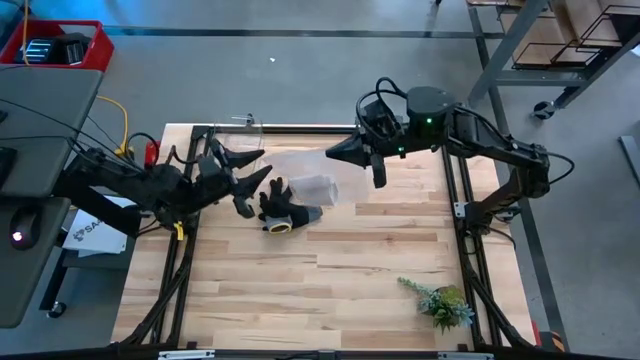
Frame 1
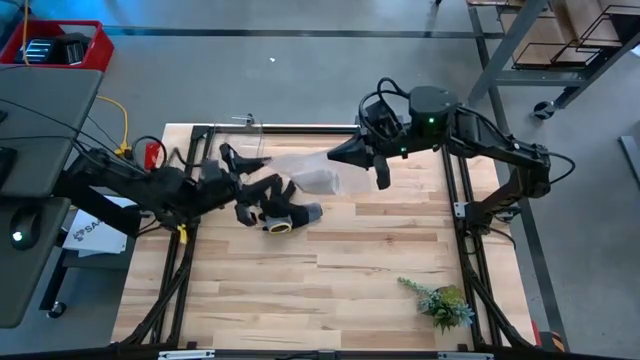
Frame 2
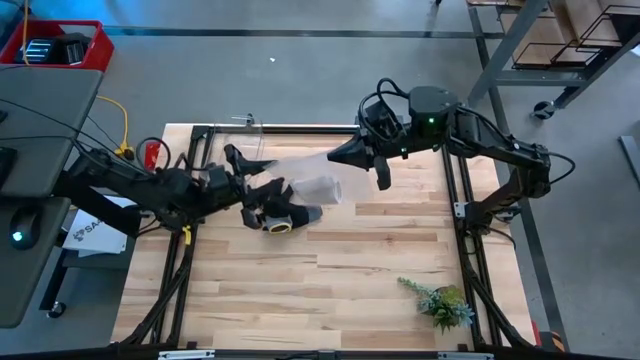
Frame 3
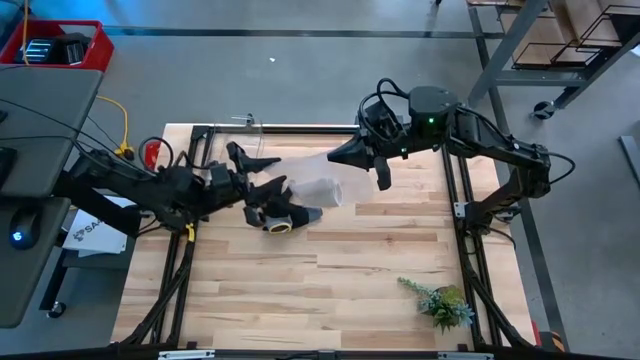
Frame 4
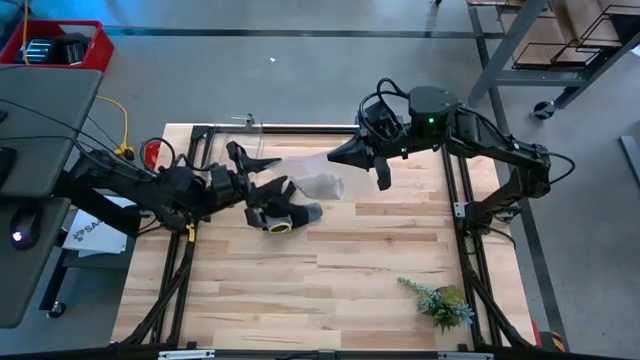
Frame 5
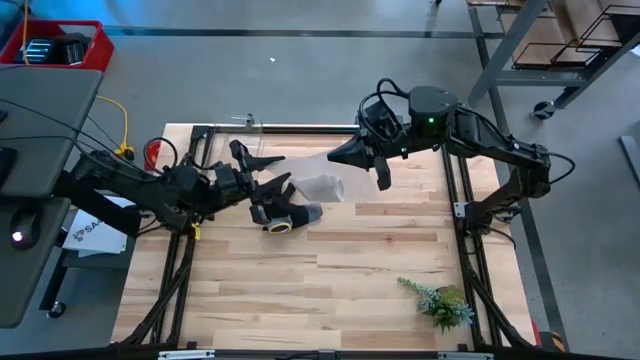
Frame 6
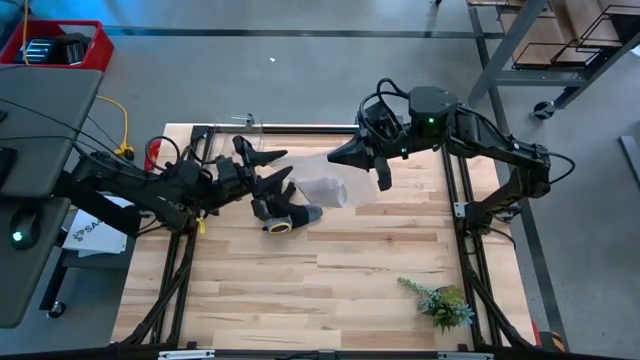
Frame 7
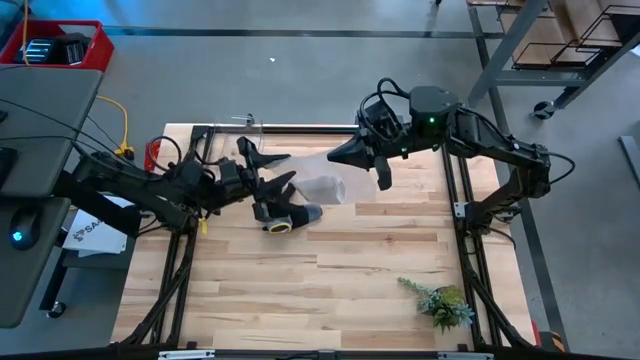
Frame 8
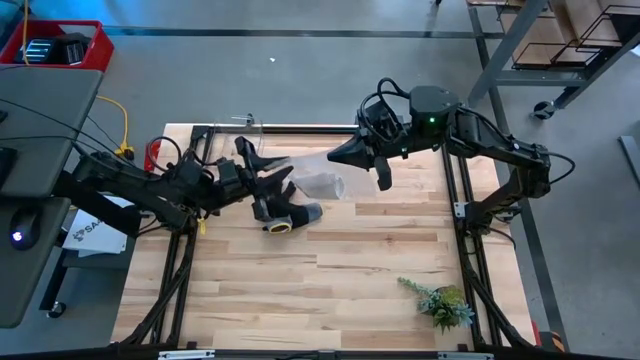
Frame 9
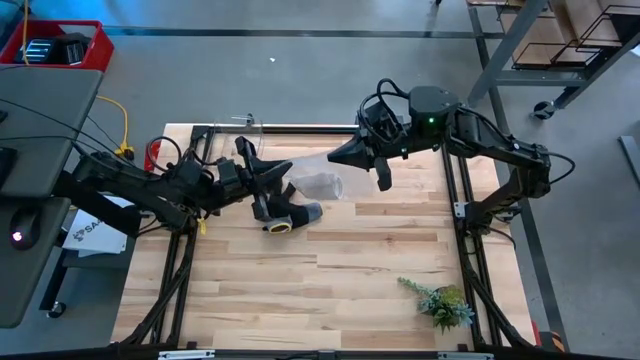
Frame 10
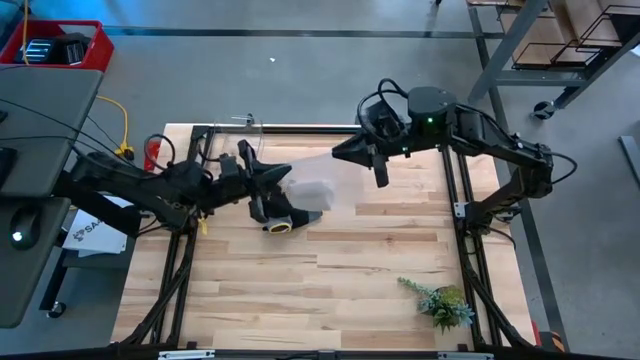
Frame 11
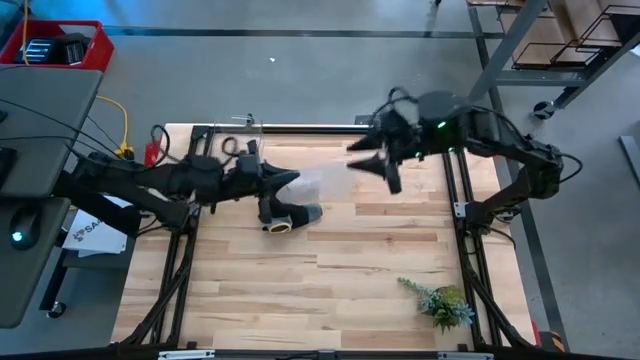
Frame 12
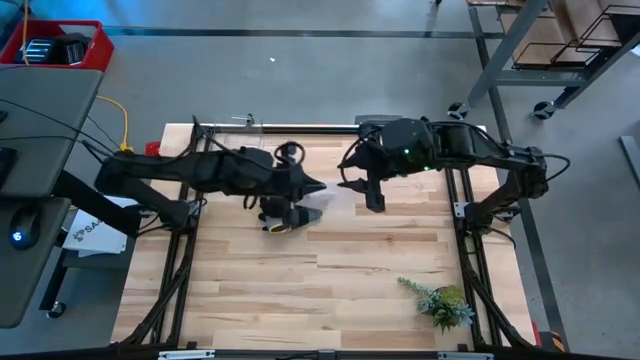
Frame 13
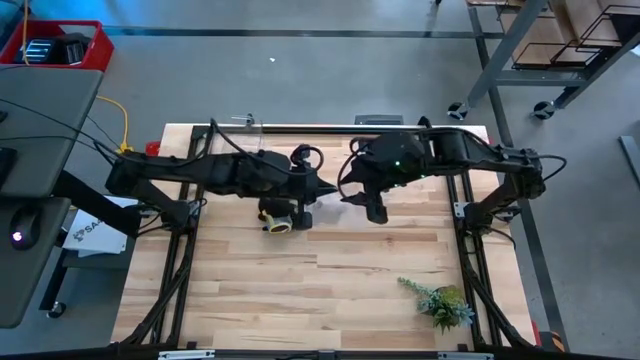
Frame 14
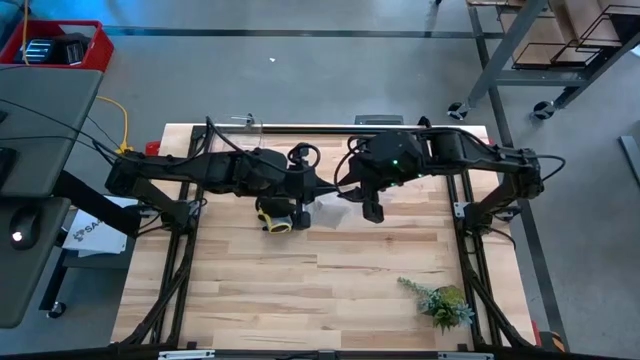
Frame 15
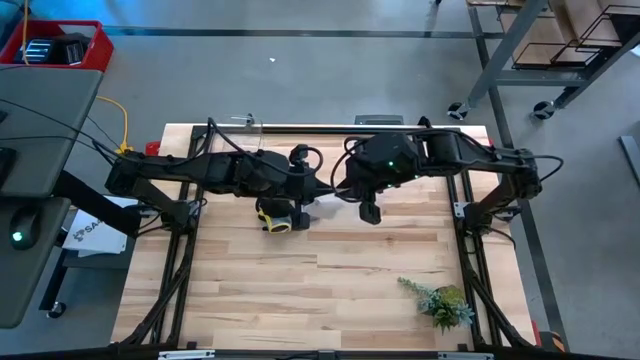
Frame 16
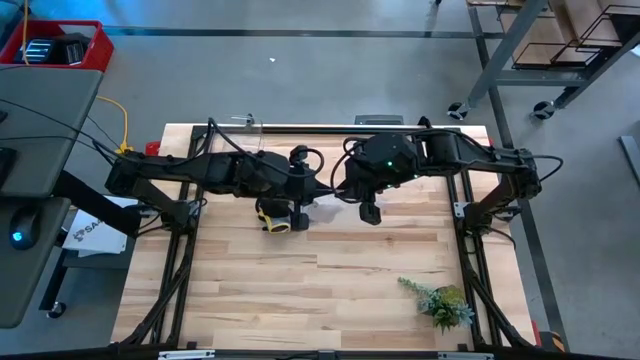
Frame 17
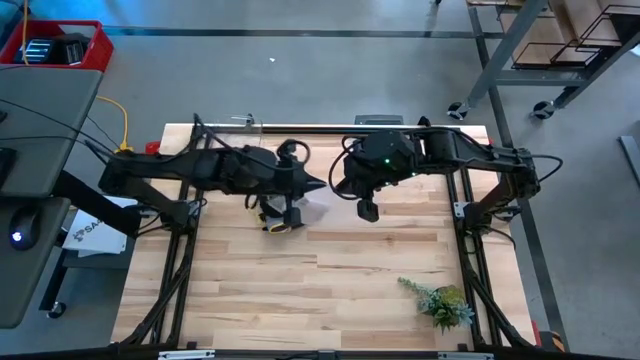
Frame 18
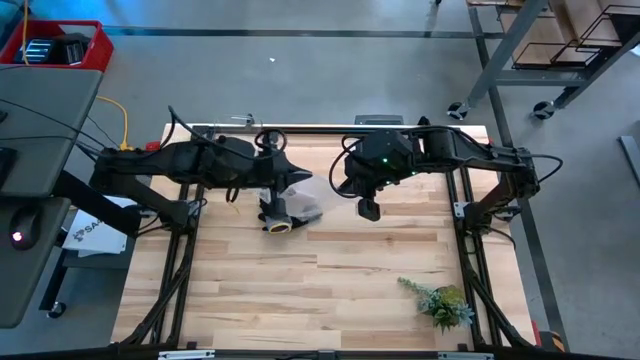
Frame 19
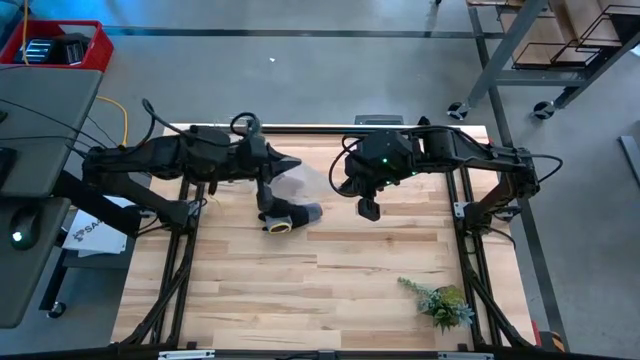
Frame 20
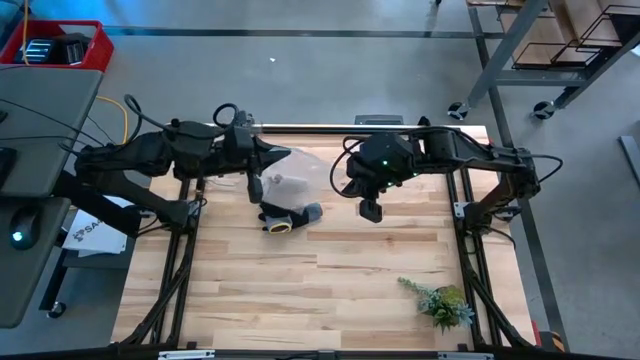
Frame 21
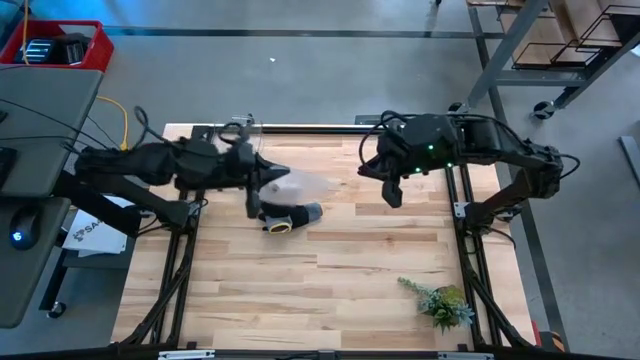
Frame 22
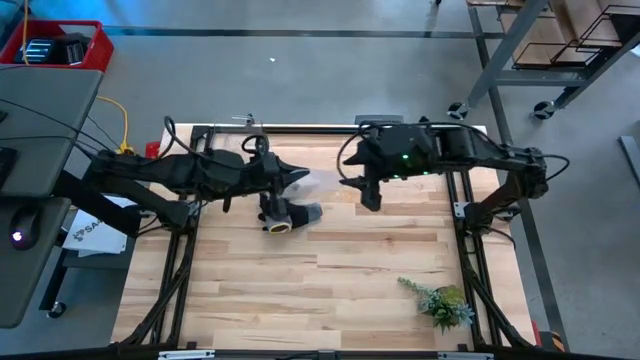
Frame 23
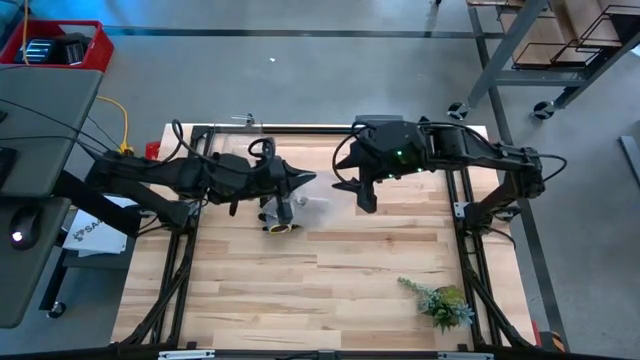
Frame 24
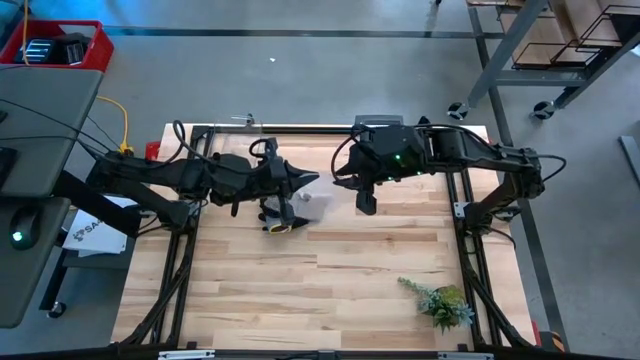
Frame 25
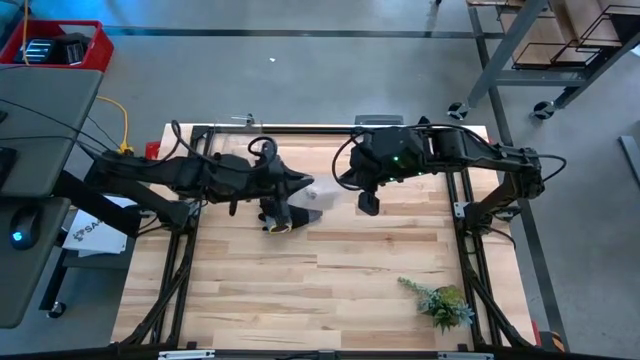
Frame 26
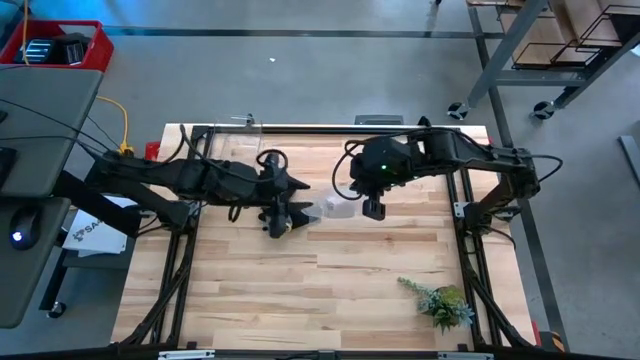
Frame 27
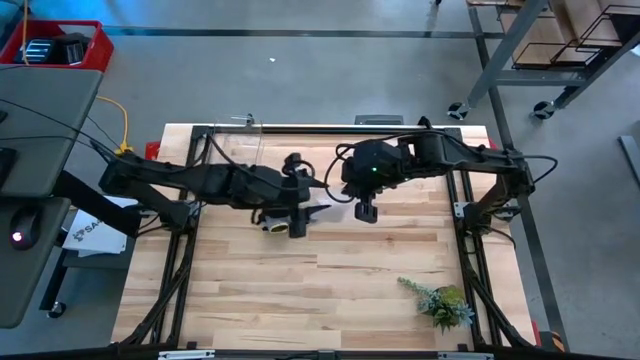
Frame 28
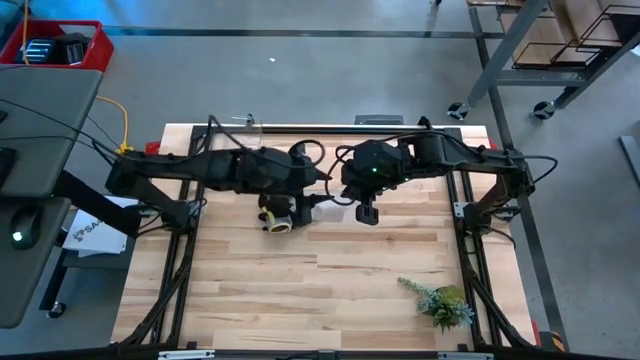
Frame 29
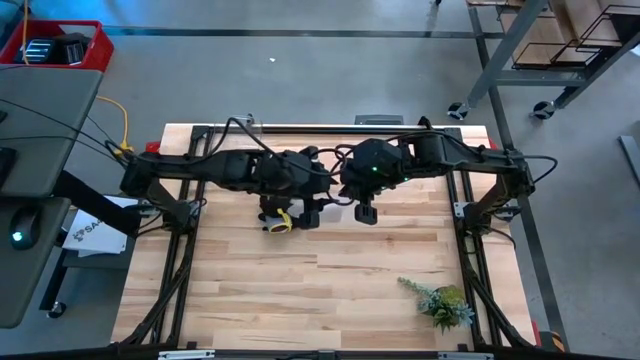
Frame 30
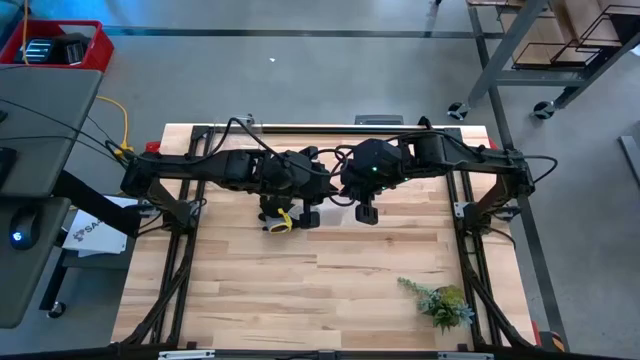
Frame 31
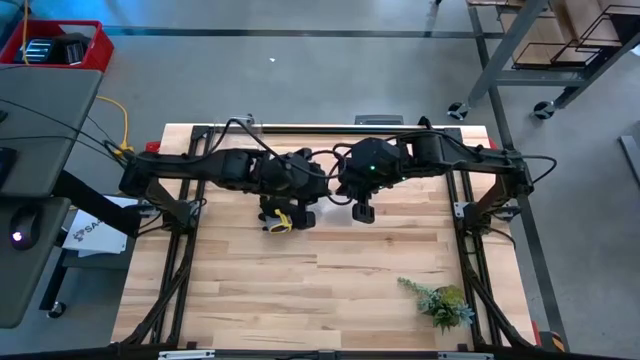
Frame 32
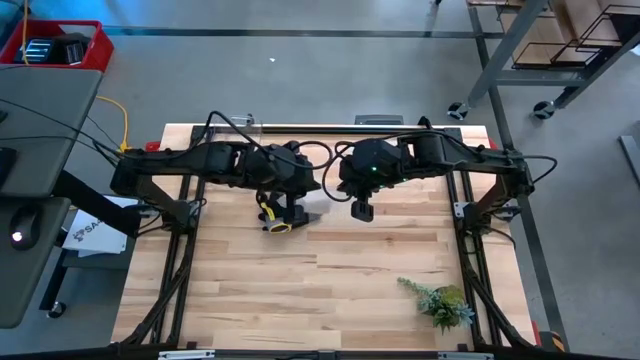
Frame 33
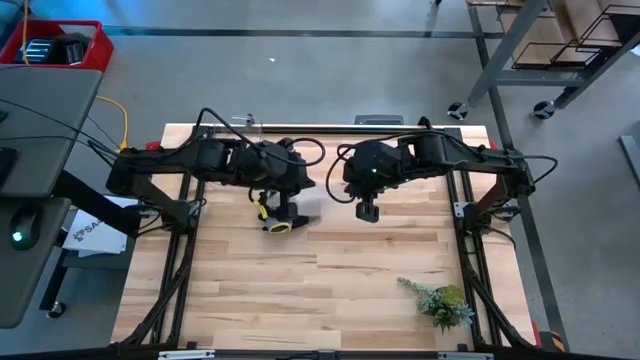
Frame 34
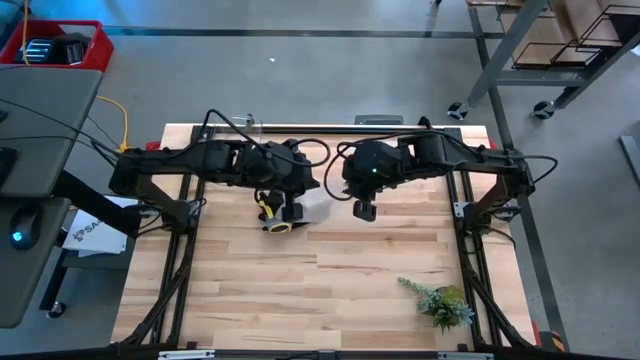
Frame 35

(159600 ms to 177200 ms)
Task: Roll bandage
Close the transparent zip bag

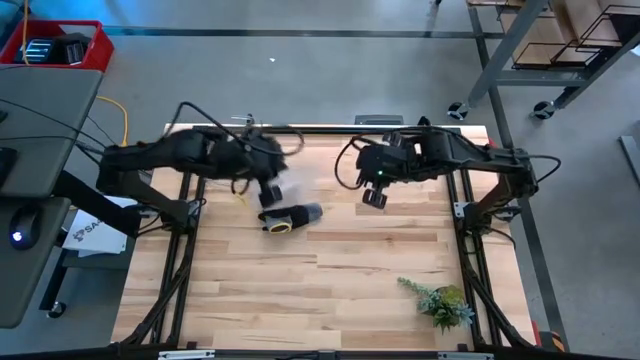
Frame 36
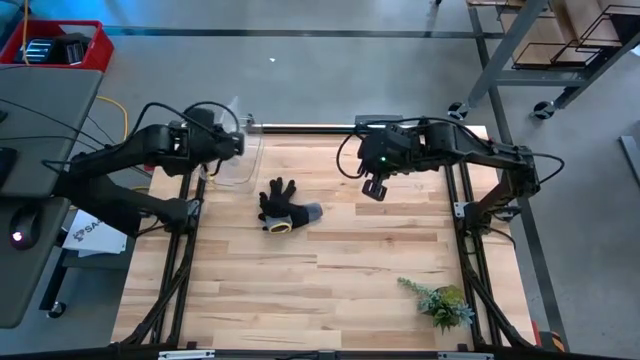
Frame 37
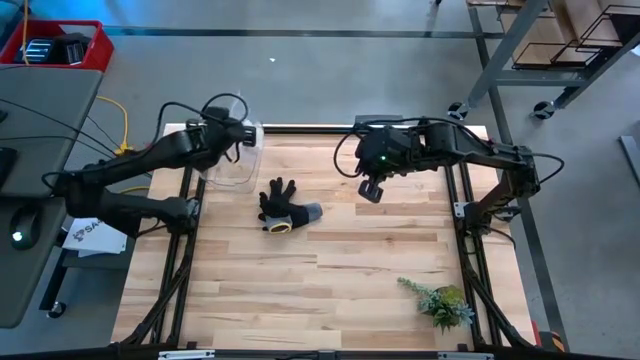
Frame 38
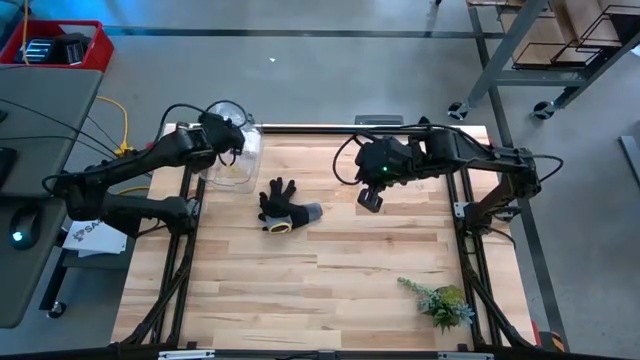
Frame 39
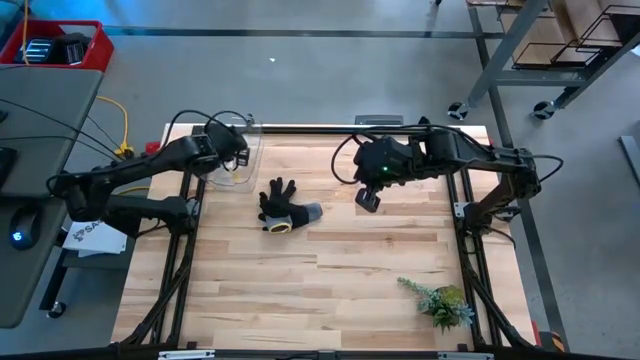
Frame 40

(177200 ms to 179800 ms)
Put the transparent zip bag into the transparent bin

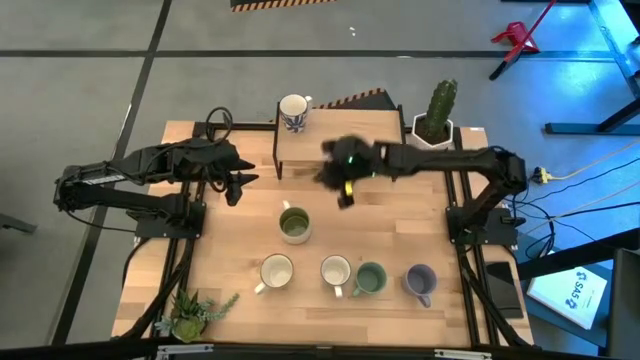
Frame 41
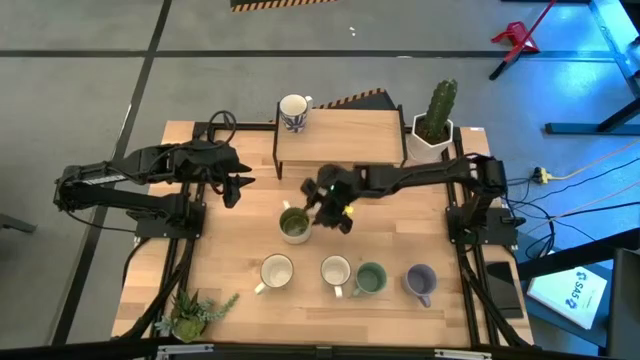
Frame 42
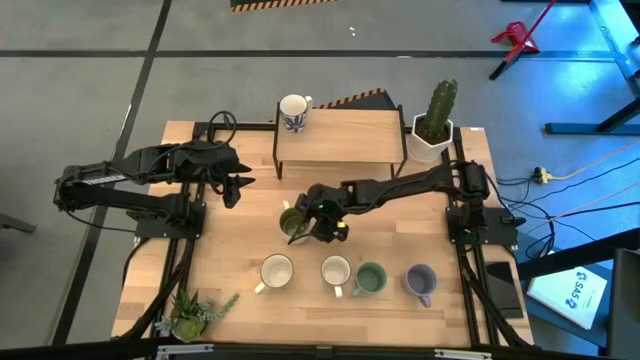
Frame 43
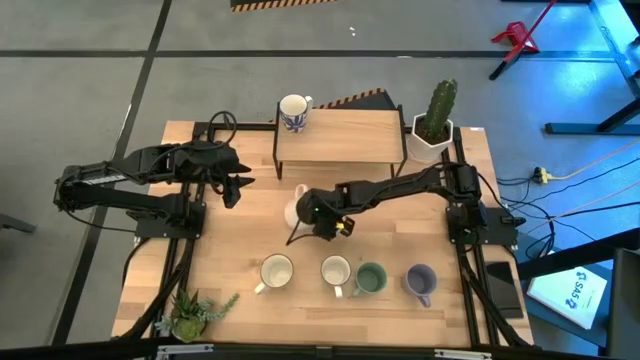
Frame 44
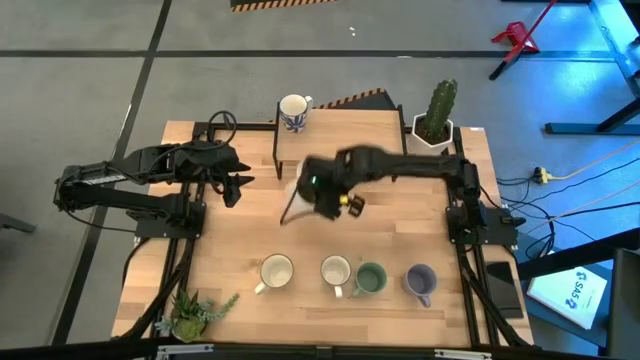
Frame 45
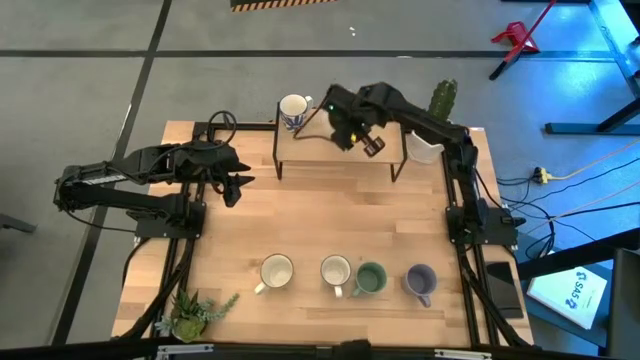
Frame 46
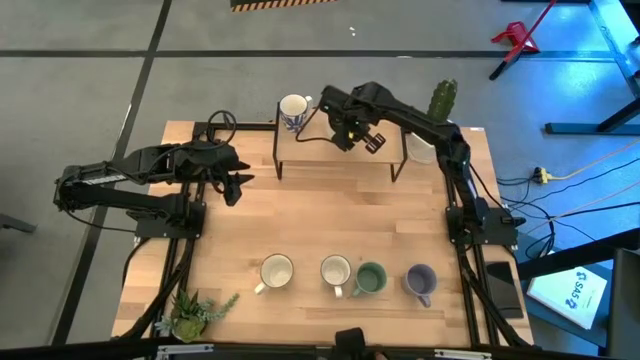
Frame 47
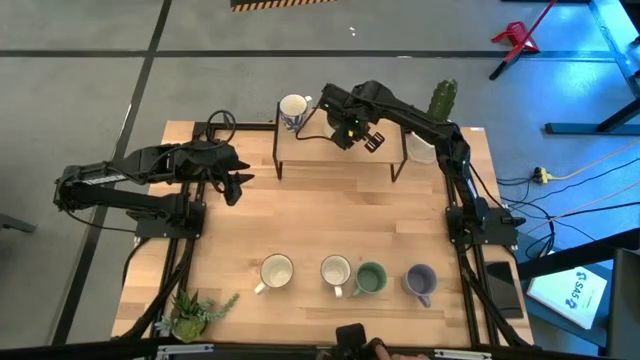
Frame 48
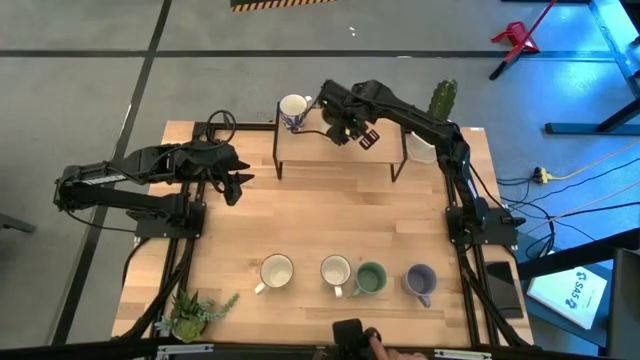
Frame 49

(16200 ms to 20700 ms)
Task: Place coffee mugs
Put the white green mug on the shelf
